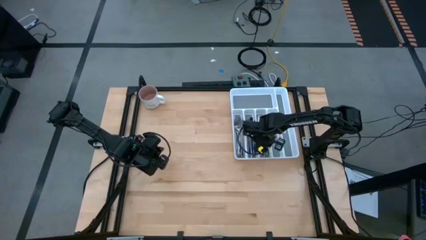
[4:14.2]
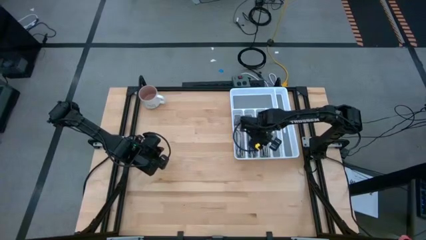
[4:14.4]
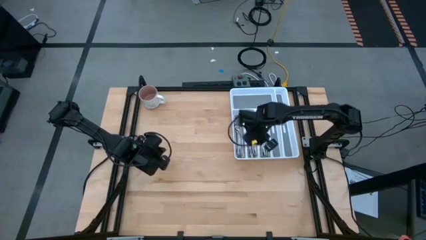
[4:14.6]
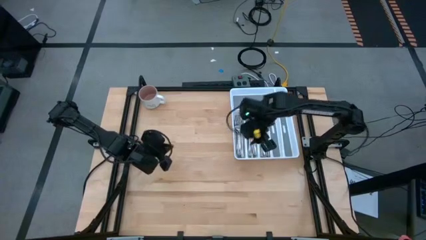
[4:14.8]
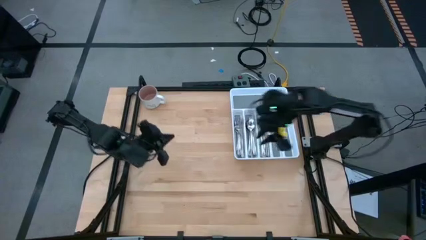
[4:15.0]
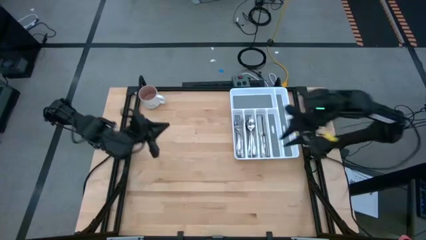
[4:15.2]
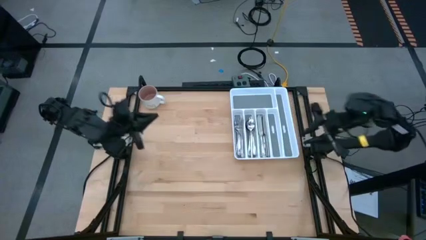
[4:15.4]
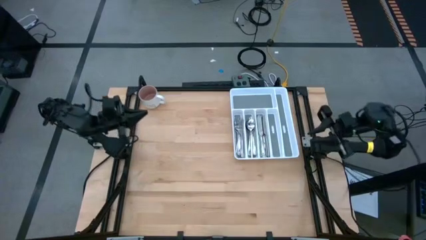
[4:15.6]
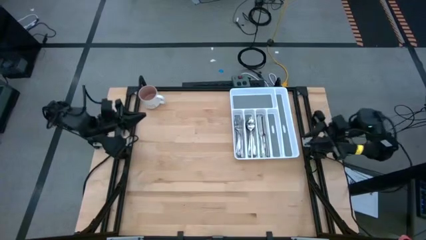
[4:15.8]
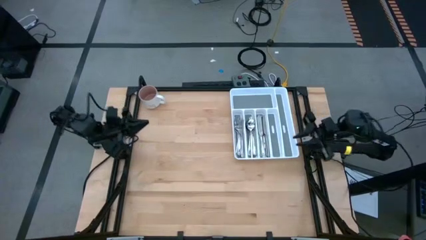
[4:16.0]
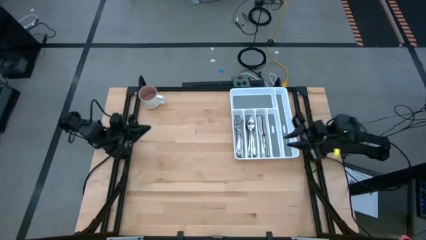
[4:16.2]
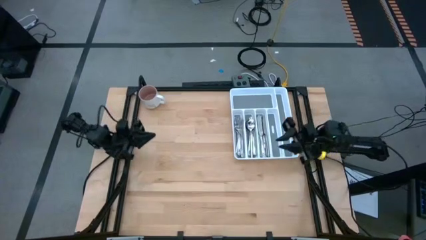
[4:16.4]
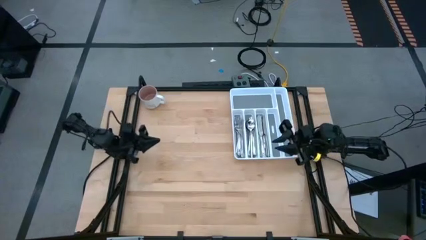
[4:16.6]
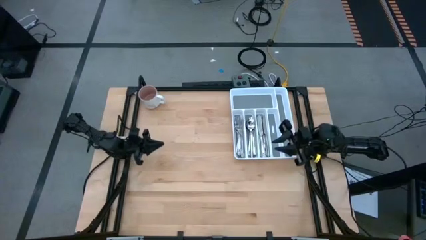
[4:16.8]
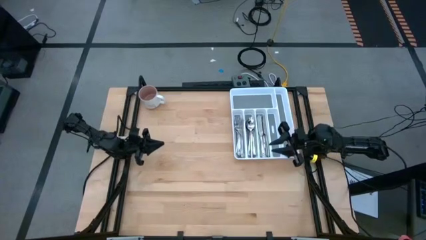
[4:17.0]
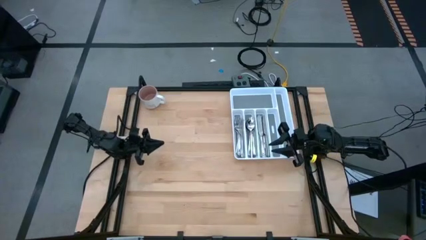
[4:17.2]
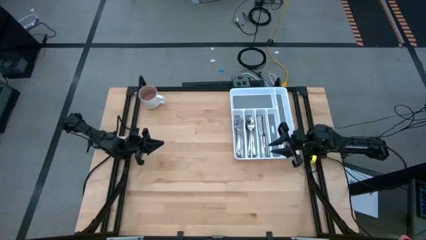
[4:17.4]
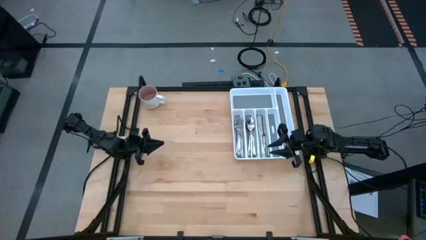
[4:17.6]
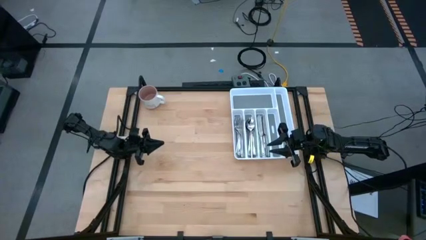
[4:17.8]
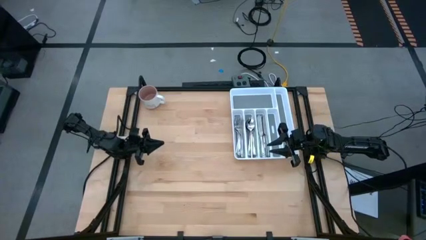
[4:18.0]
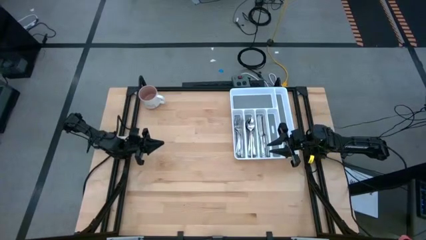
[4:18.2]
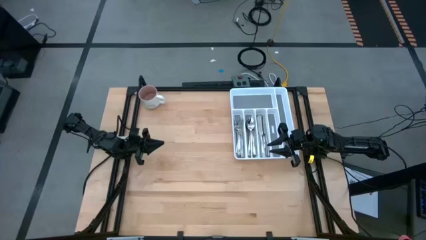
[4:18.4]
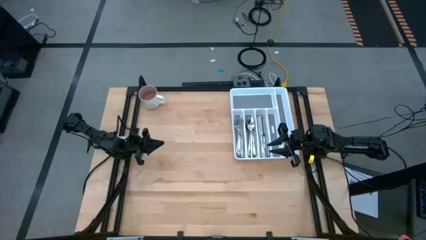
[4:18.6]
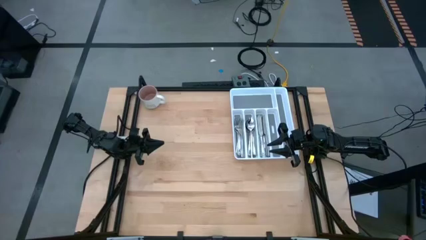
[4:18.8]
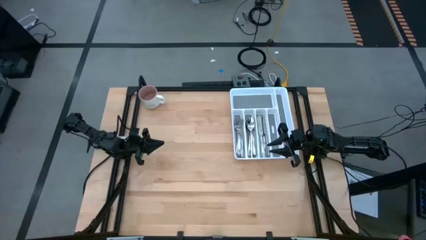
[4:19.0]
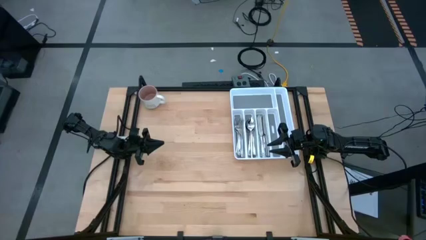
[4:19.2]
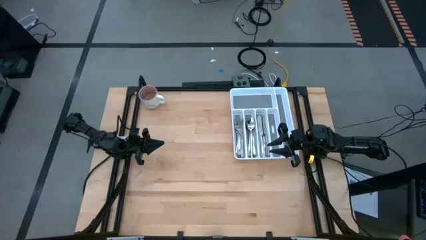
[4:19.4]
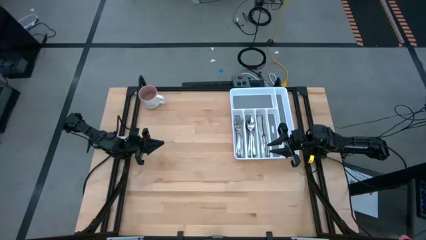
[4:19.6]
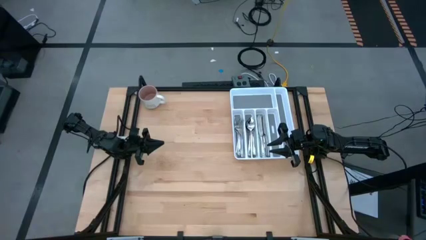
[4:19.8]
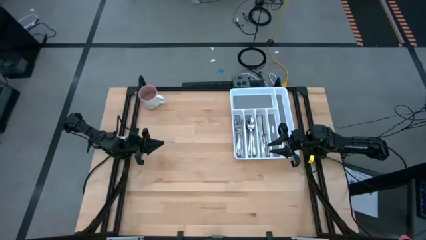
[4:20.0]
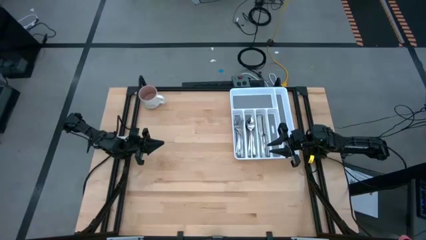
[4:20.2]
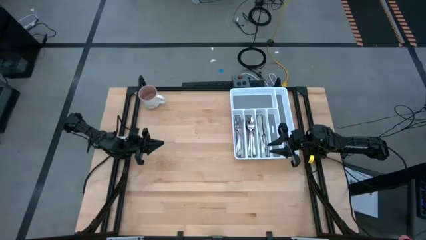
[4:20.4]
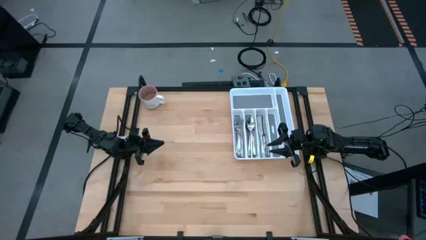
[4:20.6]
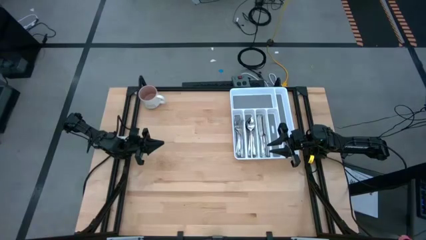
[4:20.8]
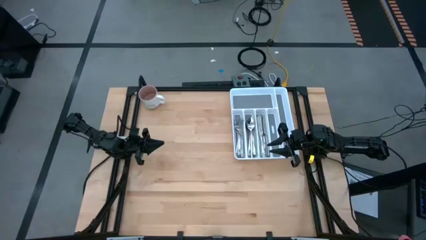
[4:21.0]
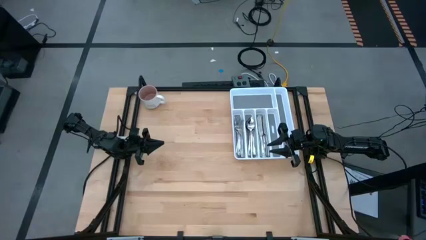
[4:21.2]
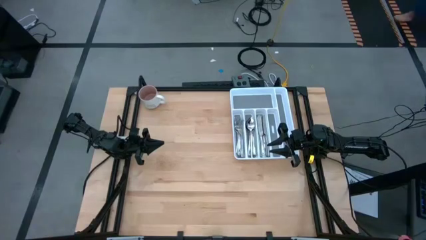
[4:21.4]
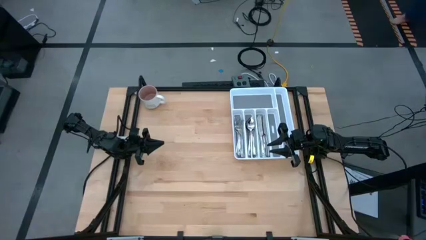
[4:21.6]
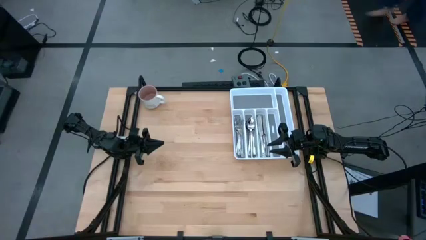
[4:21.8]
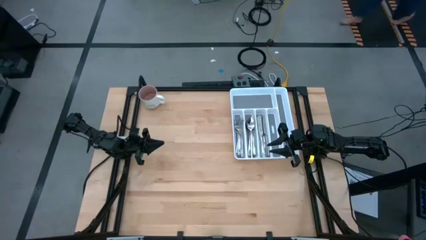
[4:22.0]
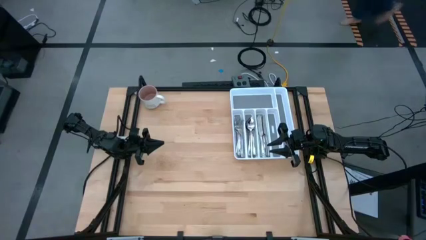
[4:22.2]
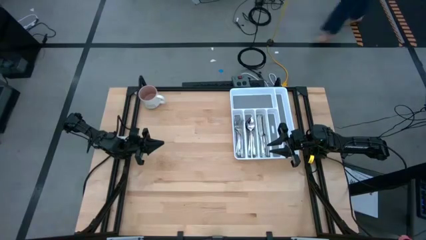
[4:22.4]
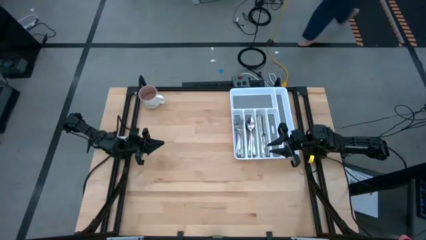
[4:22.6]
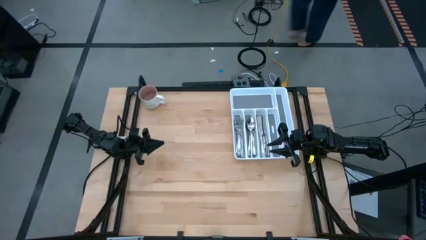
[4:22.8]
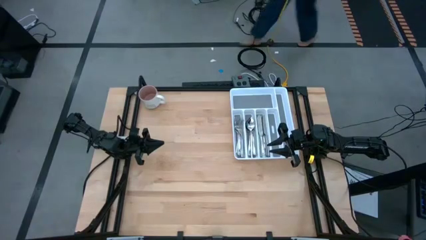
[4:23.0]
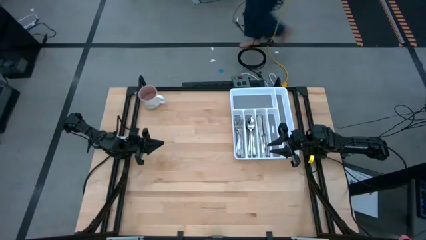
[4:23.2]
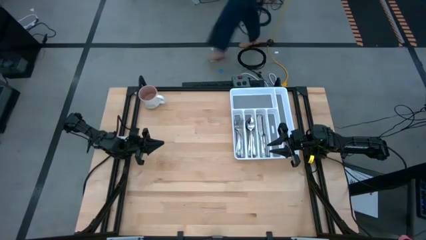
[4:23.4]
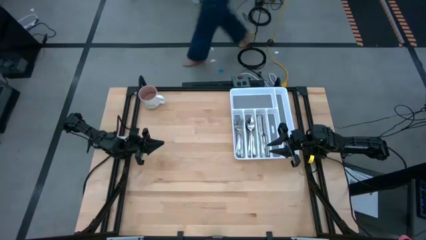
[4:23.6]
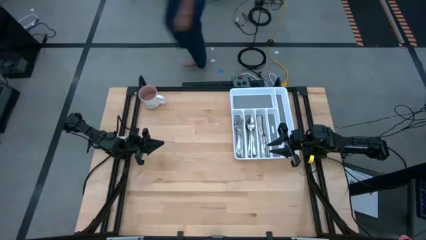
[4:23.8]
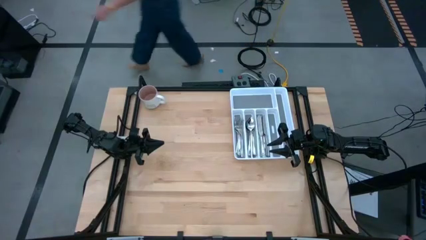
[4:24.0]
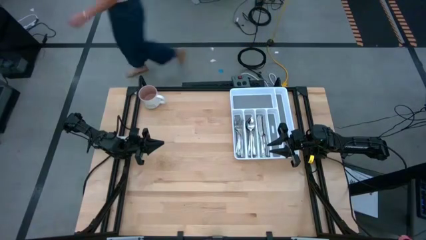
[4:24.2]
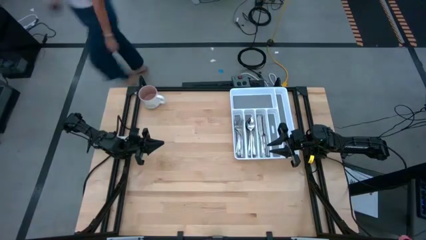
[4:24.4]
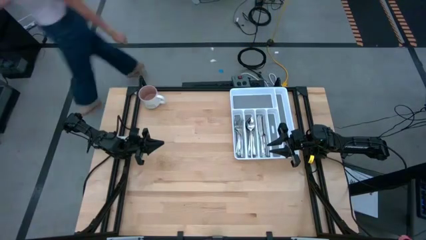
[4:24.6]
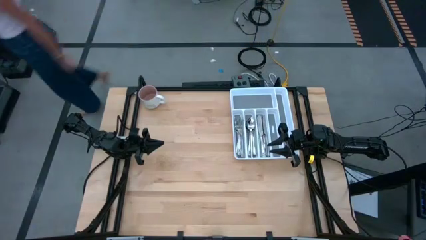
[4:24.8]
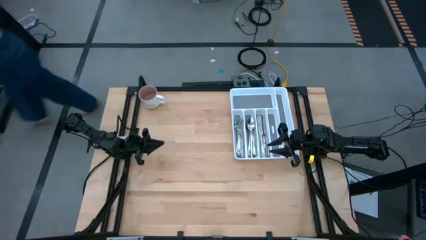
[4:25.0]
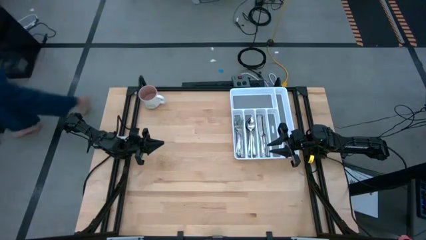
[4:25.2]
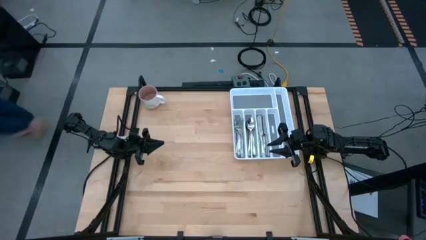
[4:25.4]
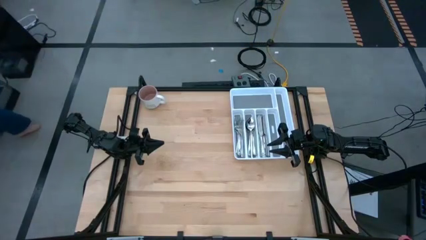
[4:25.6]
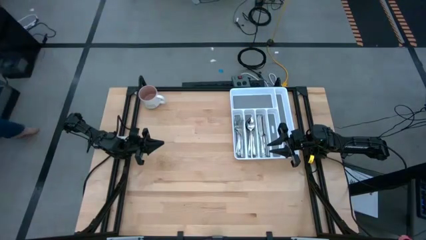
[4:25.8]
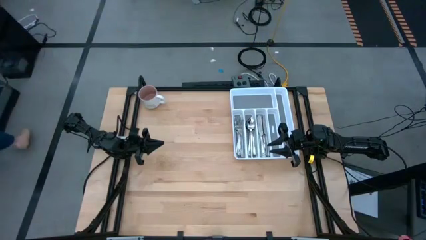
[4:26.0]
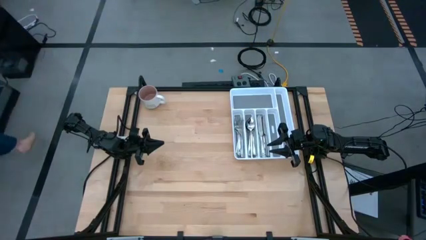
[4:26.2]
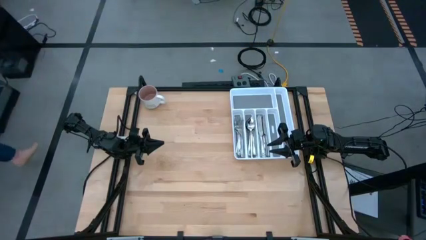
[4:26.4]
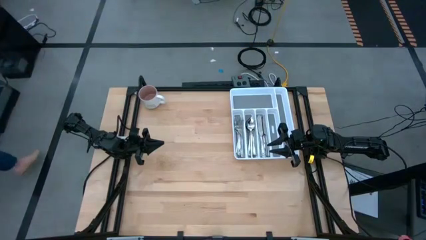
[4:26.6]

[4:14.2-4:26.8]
Task: Sort silverware
Return to Home Position
